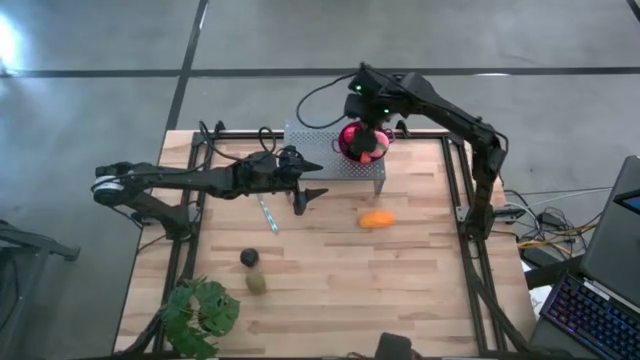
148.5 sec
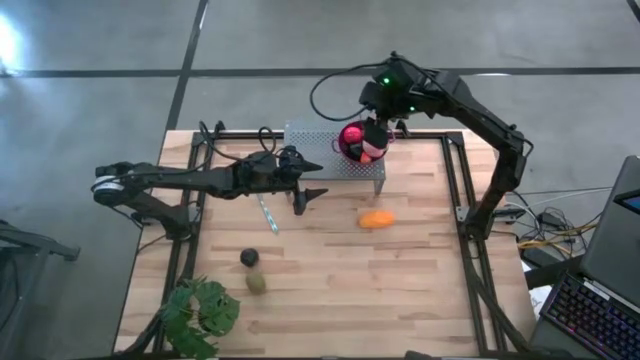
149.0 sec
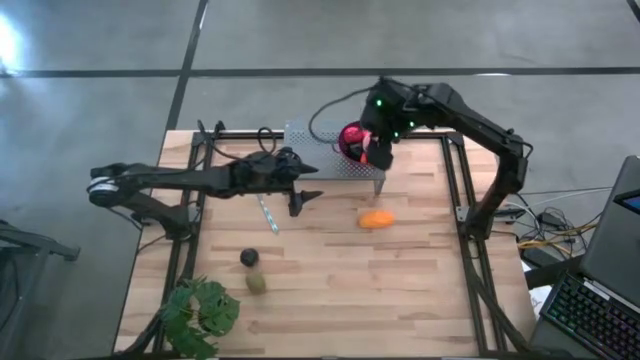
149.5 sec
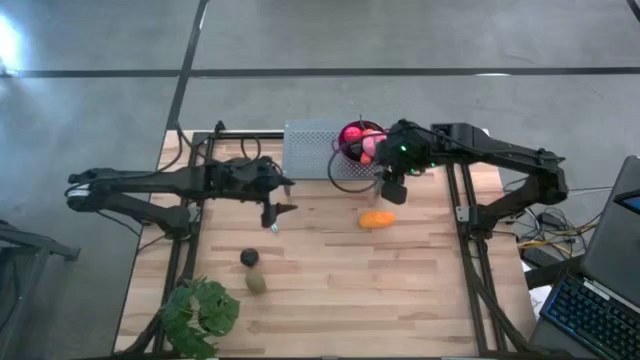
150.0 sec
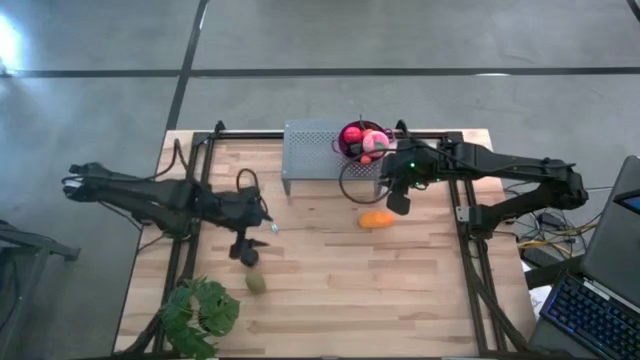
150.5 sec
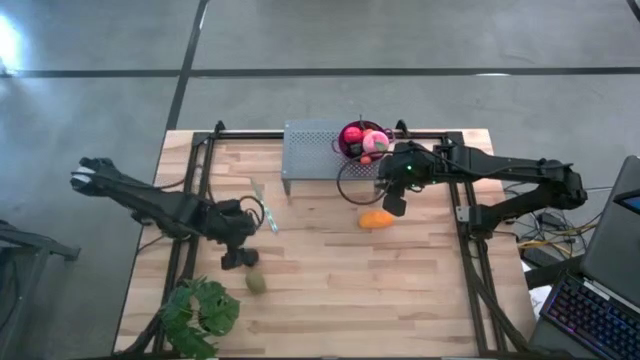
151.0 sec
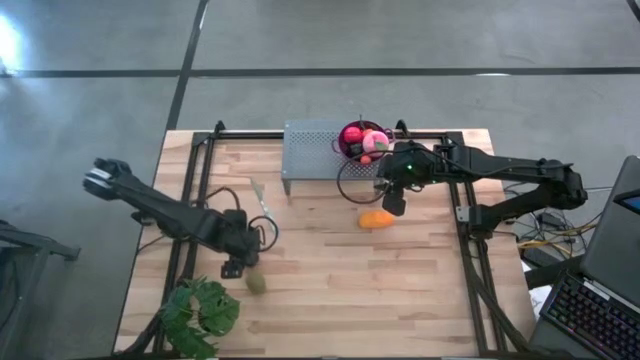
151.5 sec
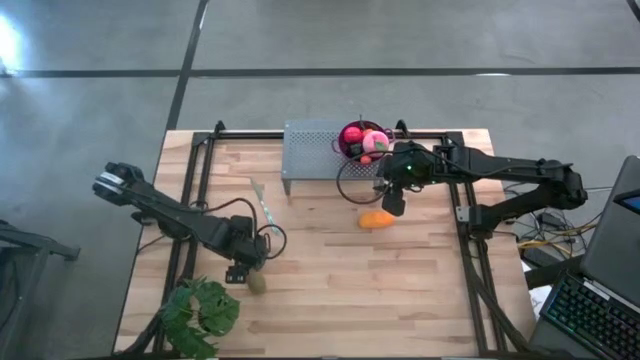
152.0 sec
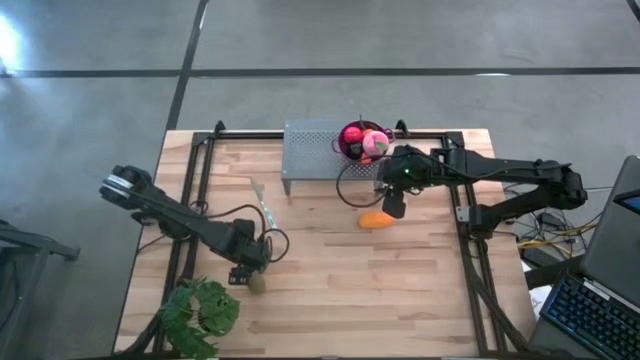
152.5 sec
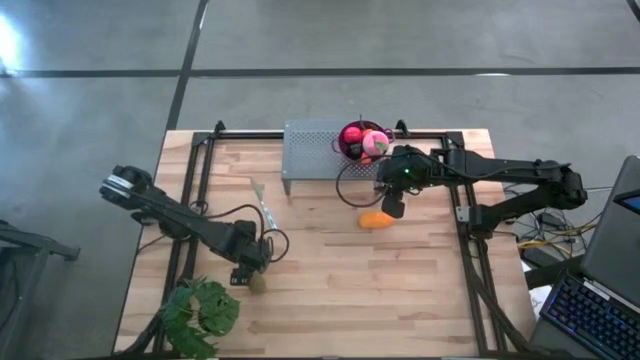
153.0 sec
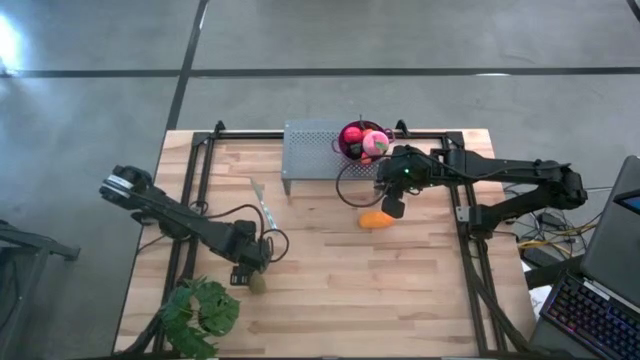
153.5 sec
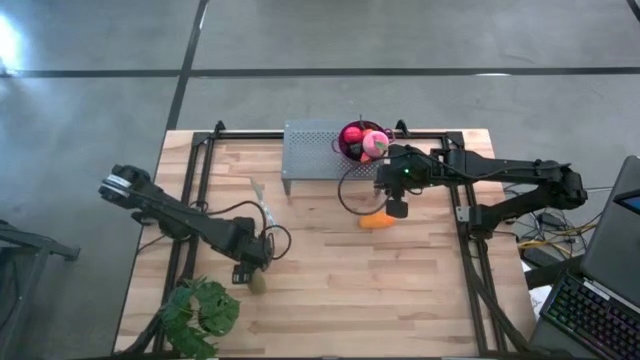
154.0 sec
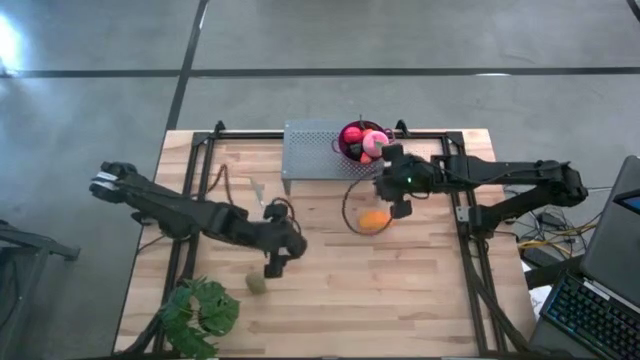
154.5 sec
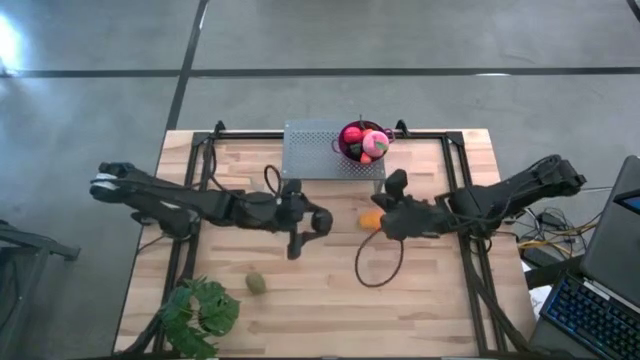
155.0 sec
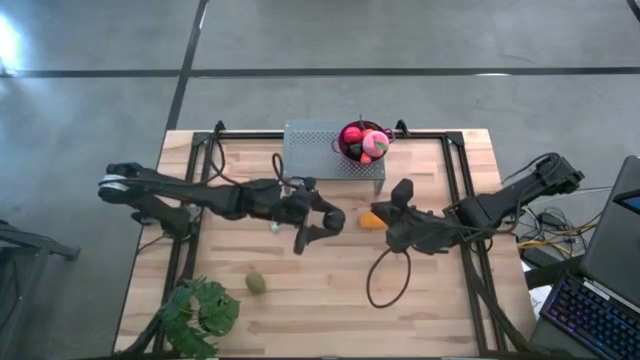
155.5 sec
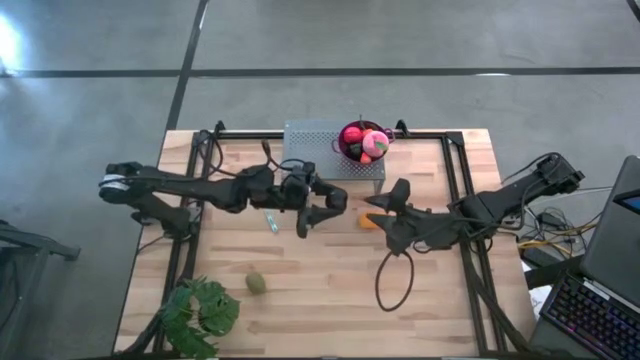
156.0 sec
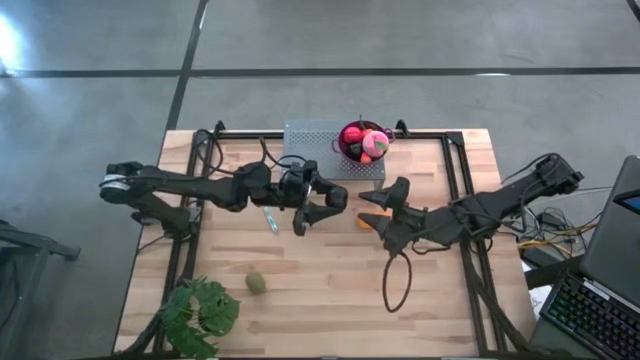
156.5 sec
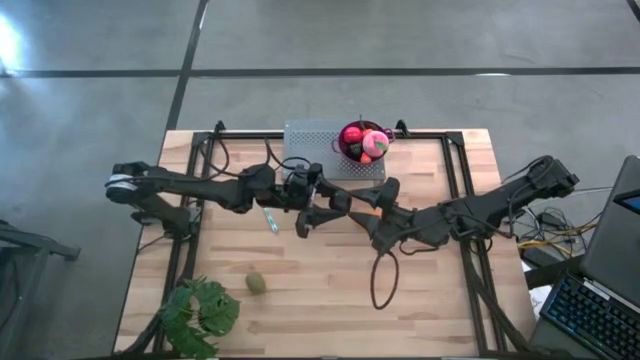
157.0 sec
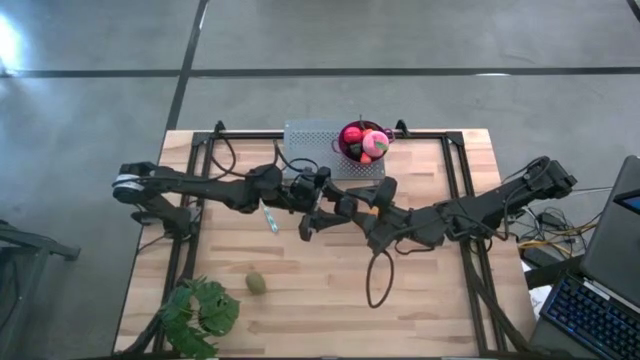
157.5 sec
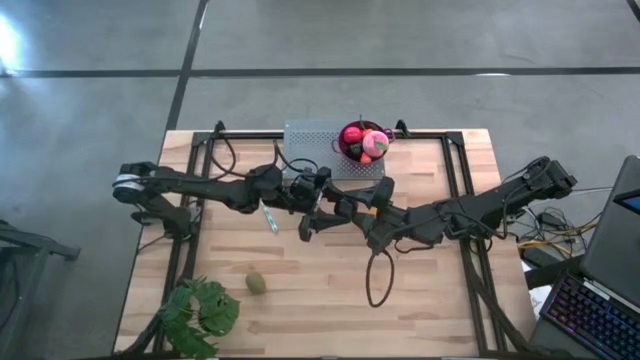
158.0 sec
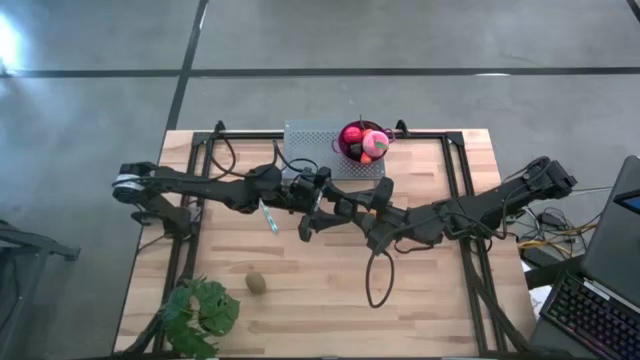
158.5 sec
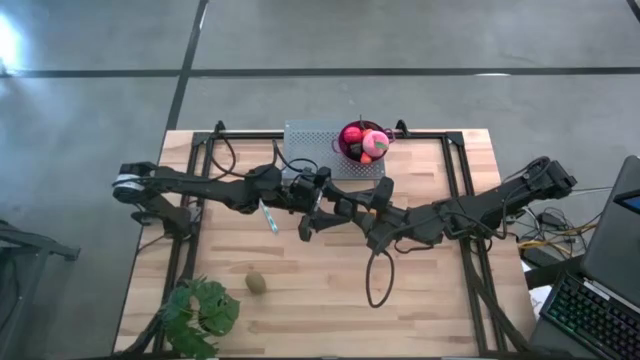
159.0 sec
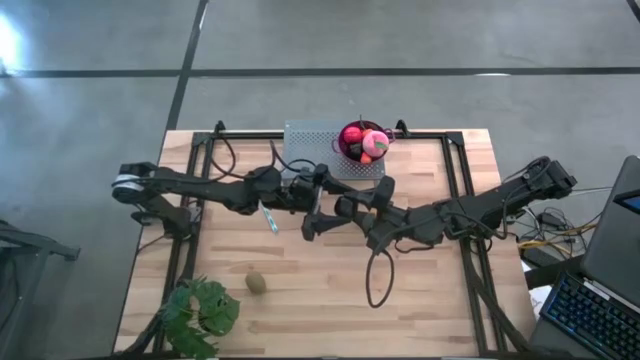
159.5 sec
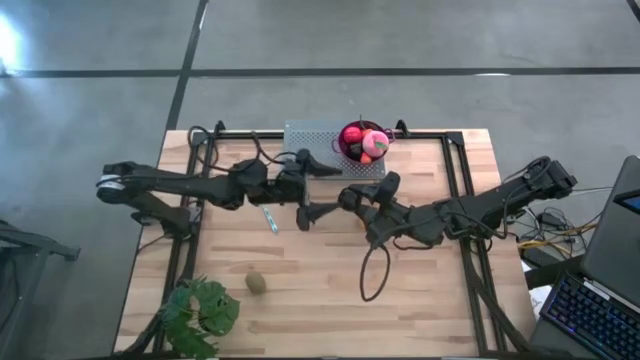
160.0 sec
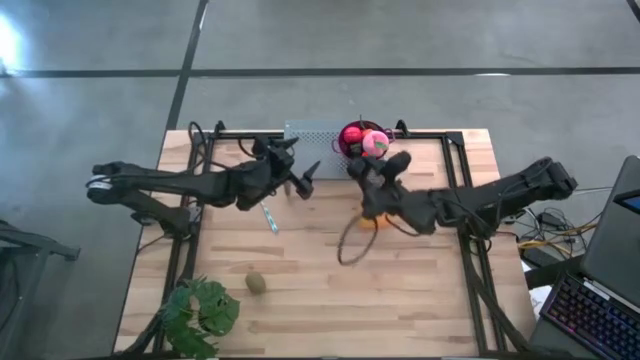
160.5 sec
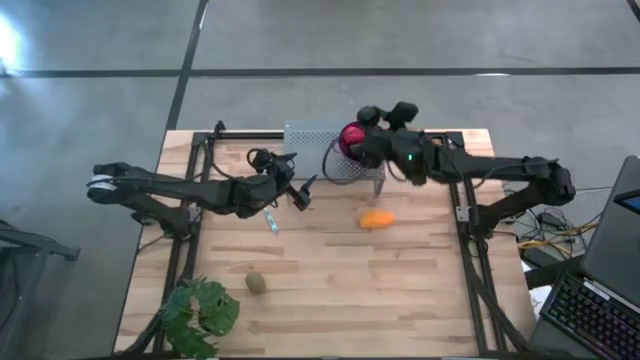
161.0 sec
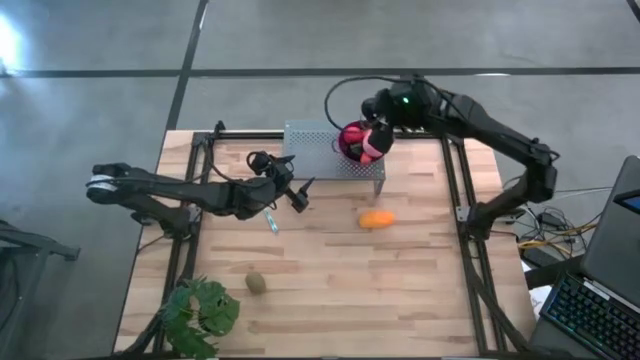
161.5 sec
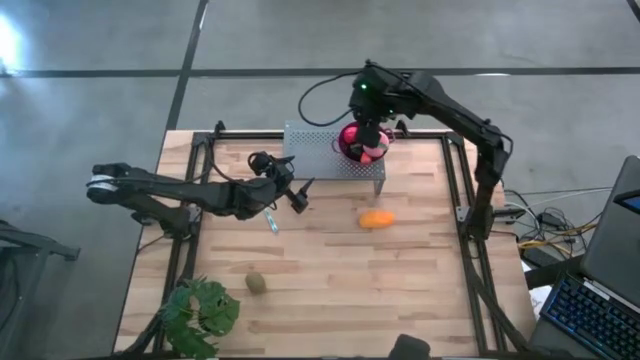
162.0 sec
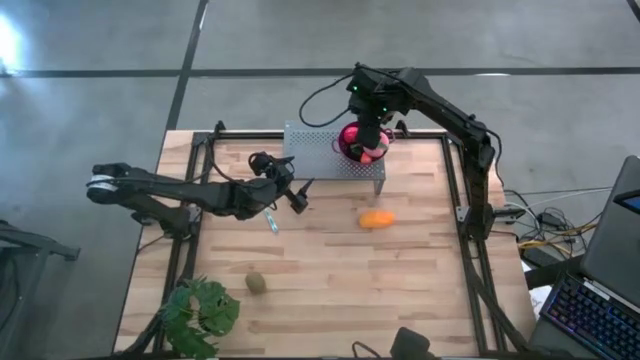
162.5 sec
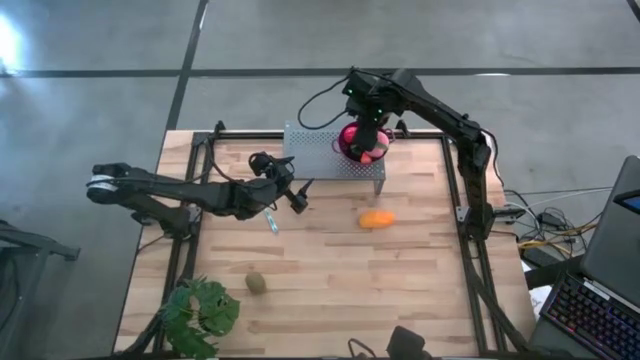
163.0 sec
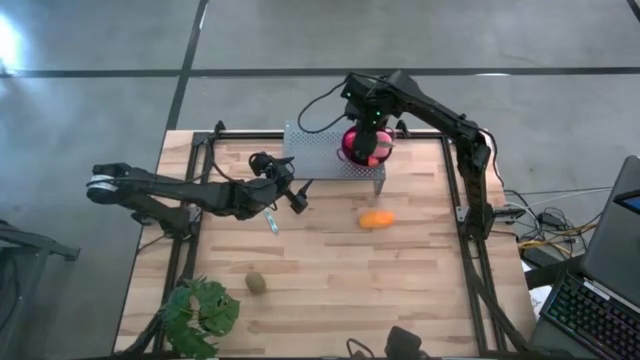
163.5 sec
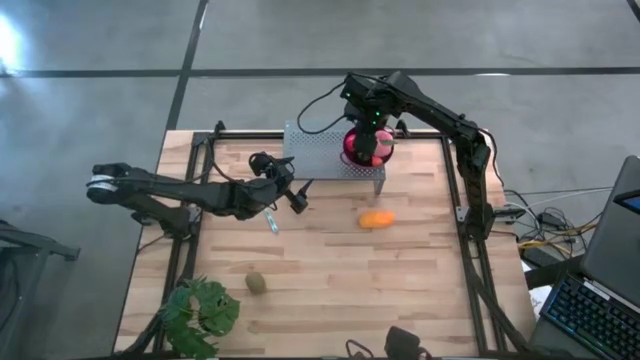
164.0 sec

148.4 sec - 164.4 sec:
Task: Pick & Place Fruit
Put the black plum into the purple bowl on the shelf

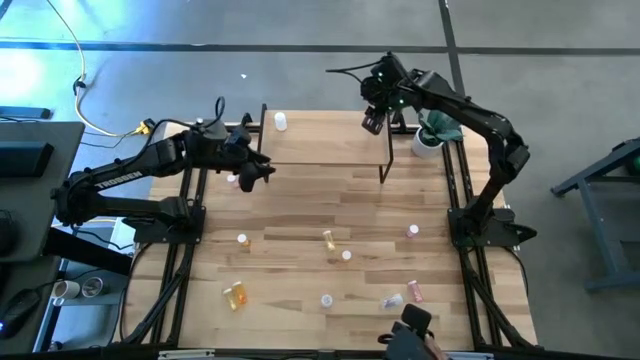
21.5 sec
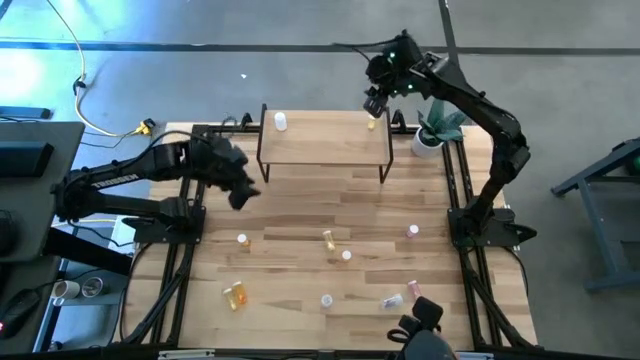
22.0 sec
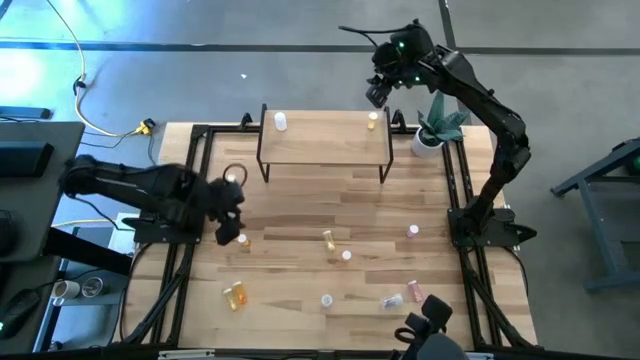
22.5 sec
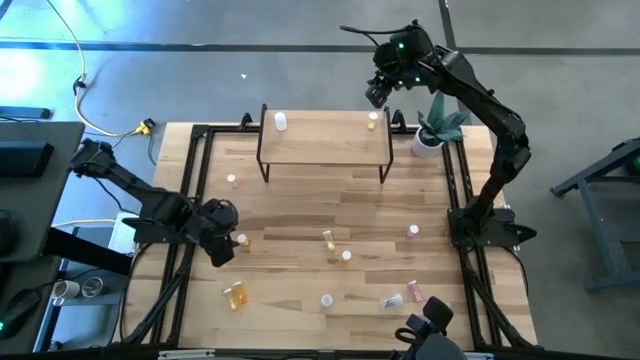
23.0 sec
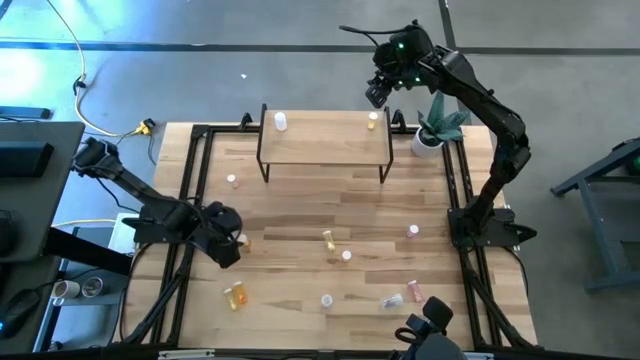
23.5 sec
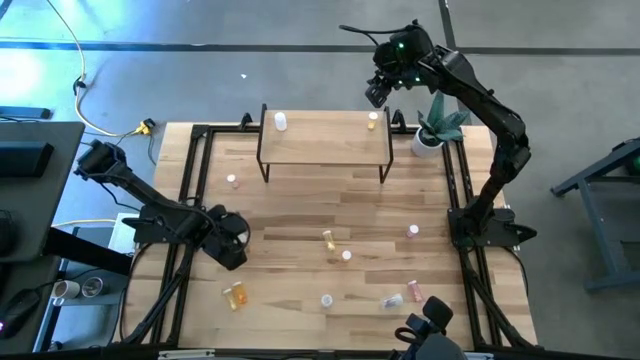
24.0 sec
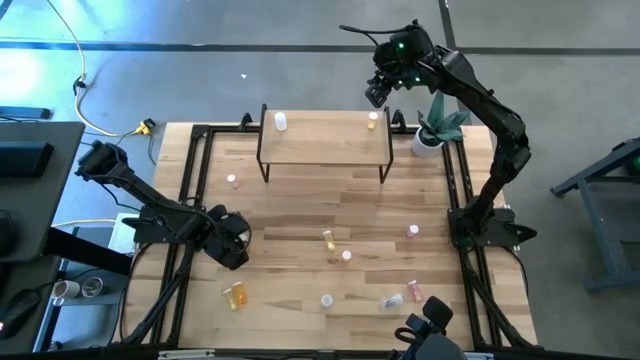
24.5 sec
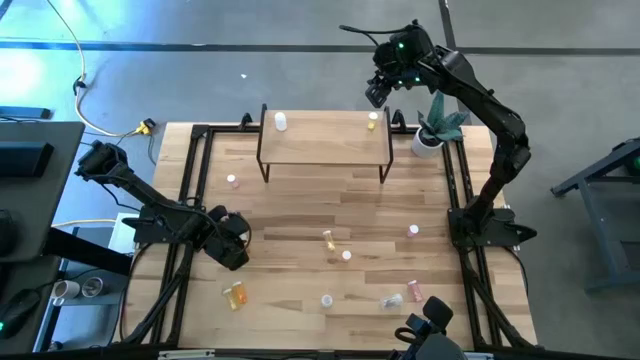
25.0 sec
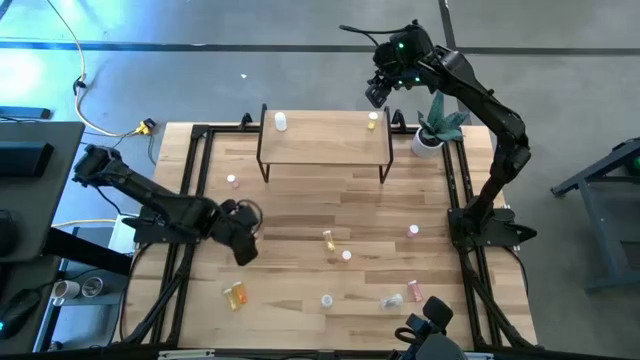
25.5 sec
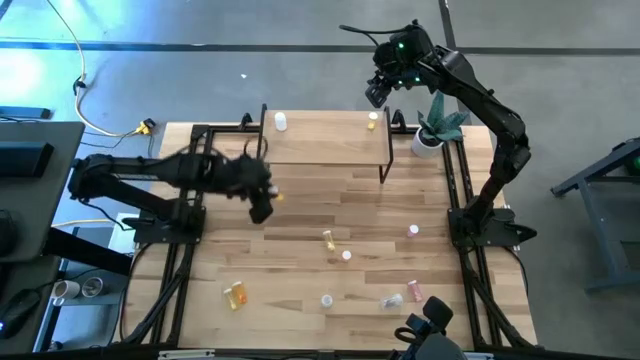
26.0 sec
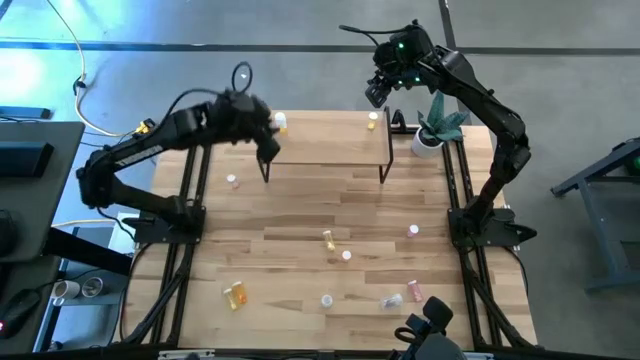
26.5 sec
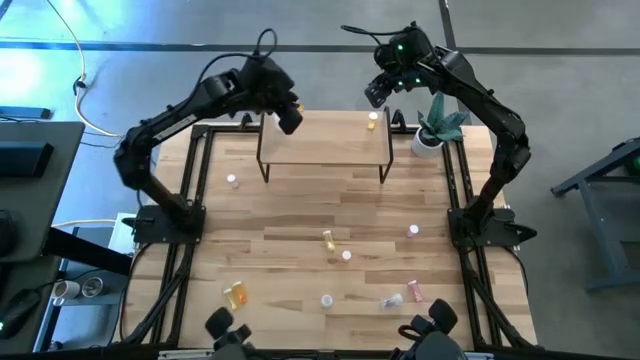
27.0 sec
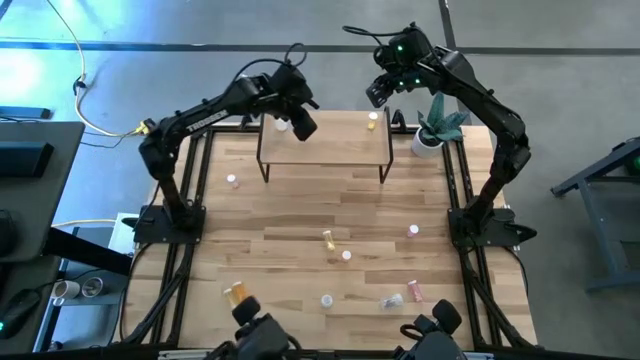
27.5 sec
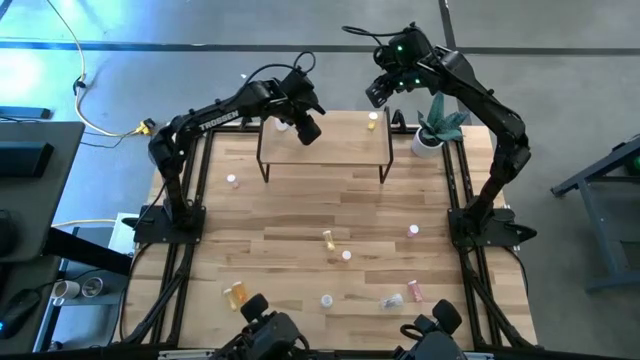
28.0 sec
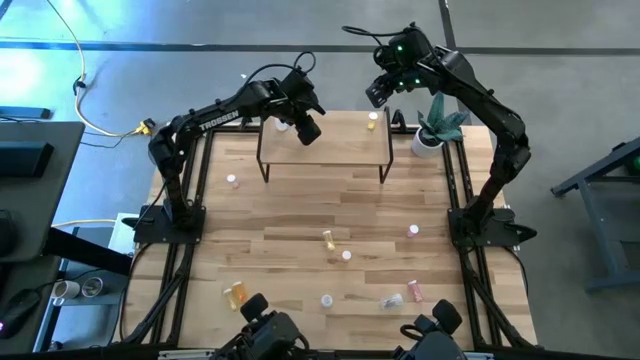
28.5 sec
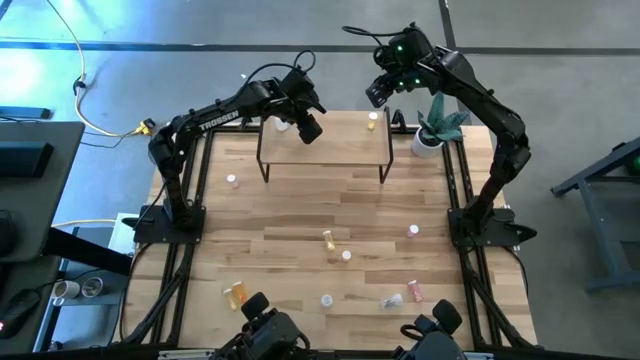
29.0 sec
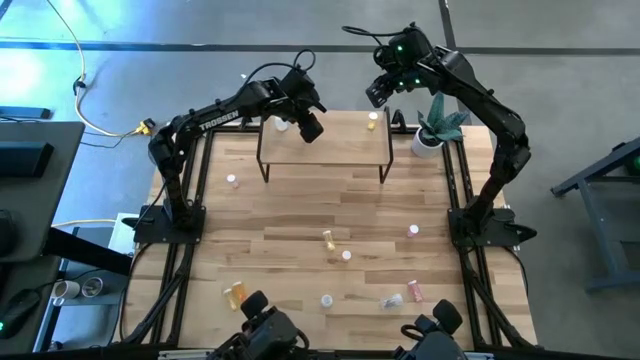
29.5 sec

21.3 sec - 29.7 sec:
Task: Pick and place medicine bottles onto shelf by color
Put the top right orange pill bottle on the shelf
